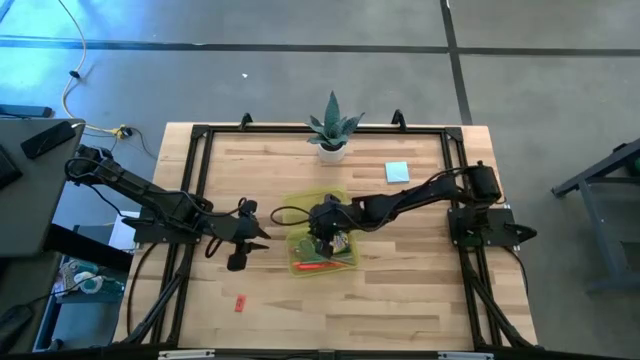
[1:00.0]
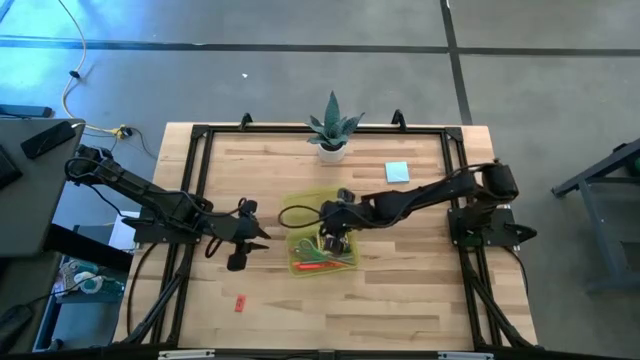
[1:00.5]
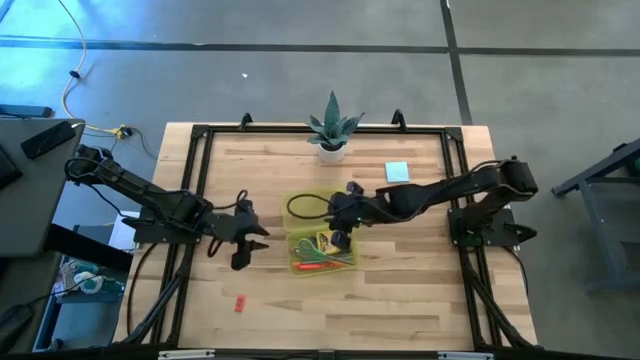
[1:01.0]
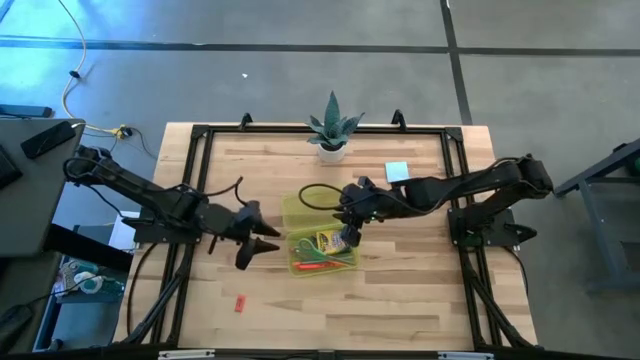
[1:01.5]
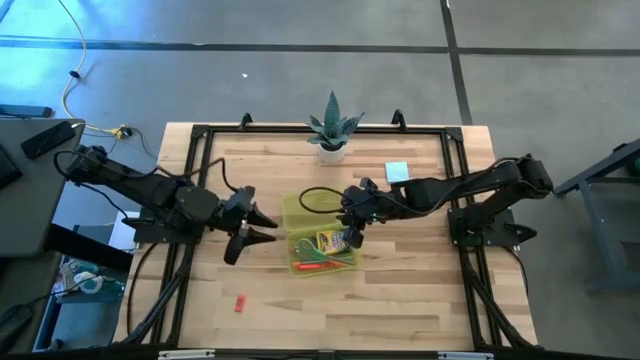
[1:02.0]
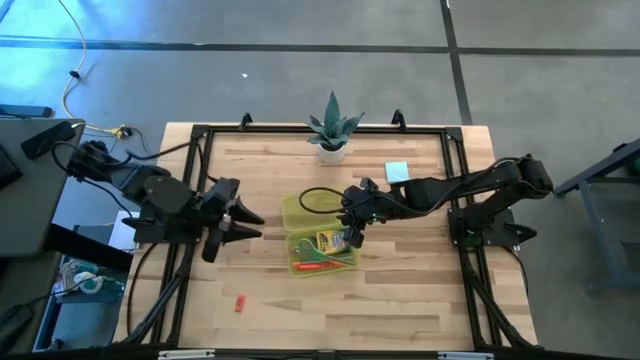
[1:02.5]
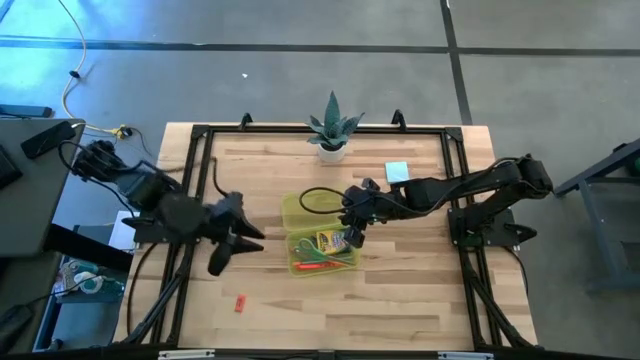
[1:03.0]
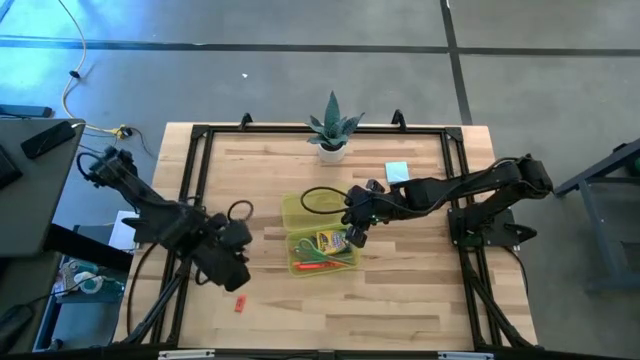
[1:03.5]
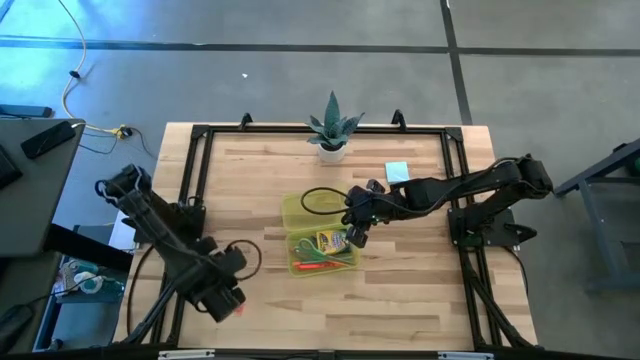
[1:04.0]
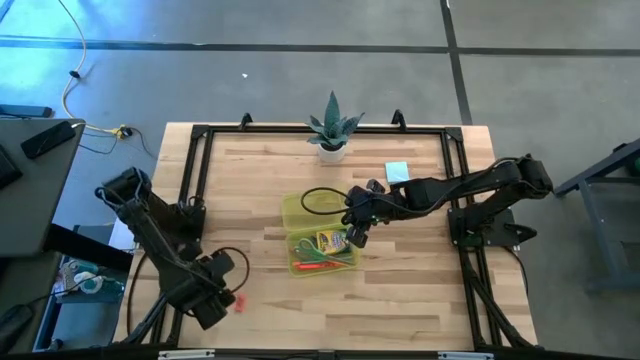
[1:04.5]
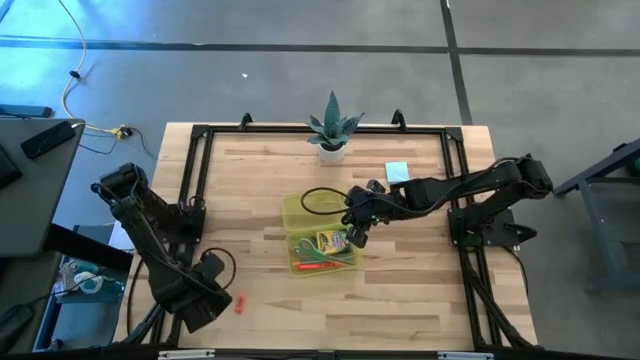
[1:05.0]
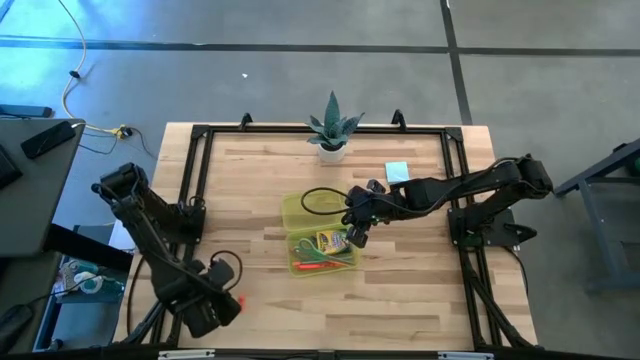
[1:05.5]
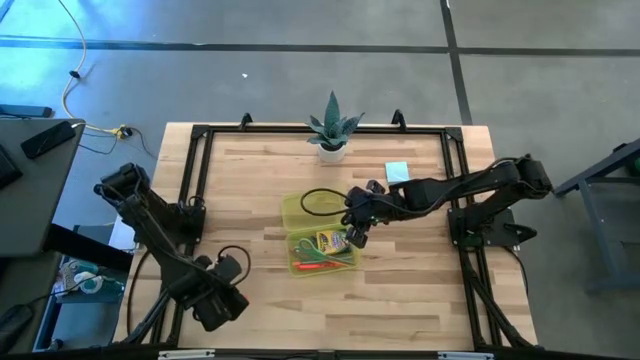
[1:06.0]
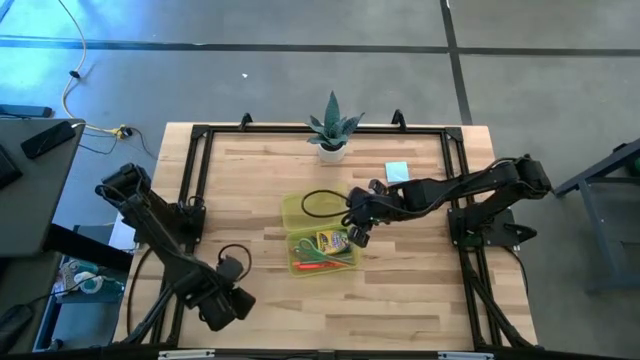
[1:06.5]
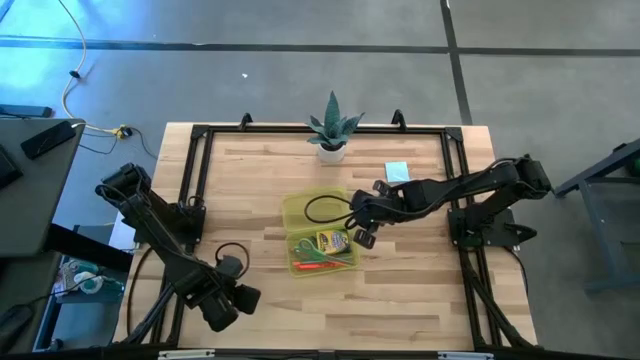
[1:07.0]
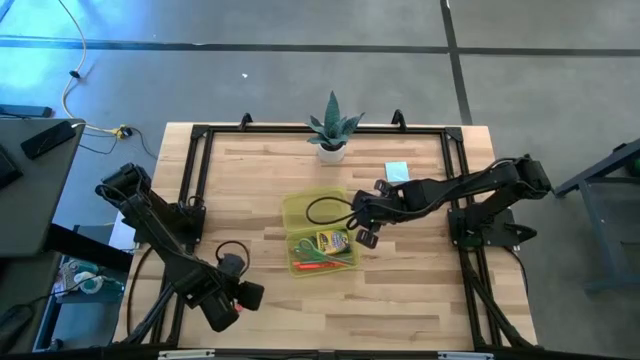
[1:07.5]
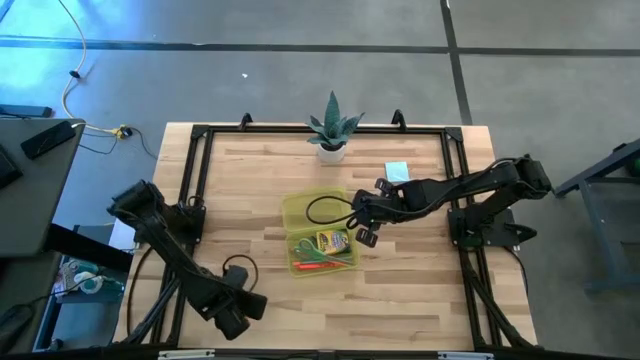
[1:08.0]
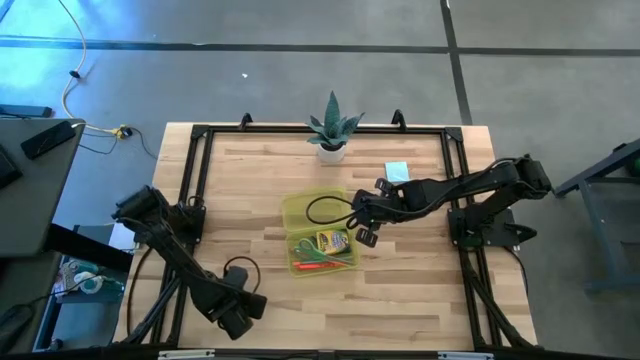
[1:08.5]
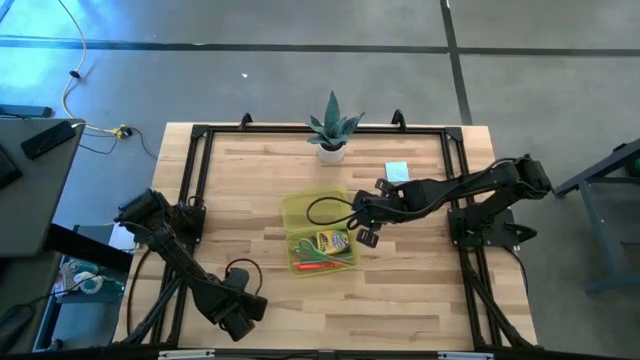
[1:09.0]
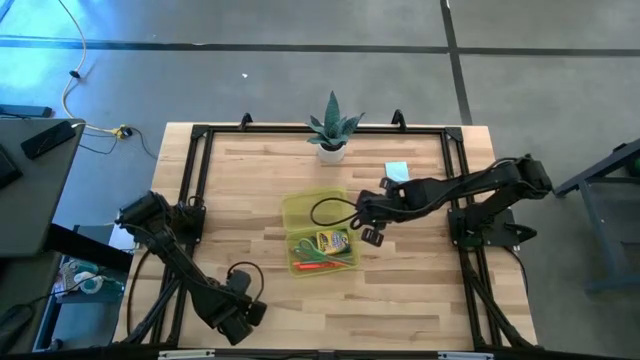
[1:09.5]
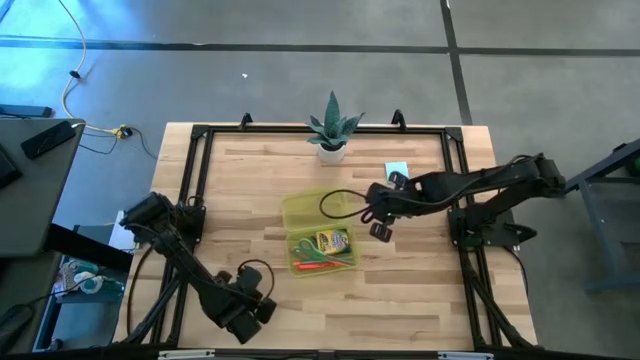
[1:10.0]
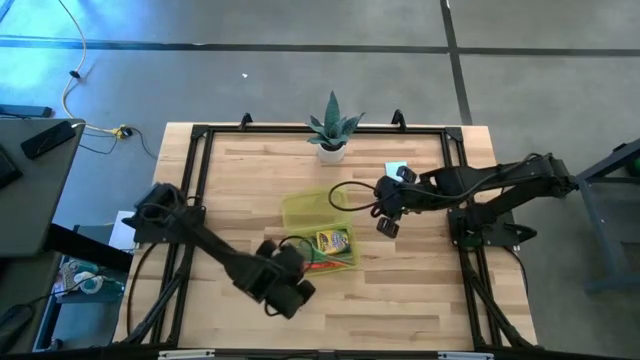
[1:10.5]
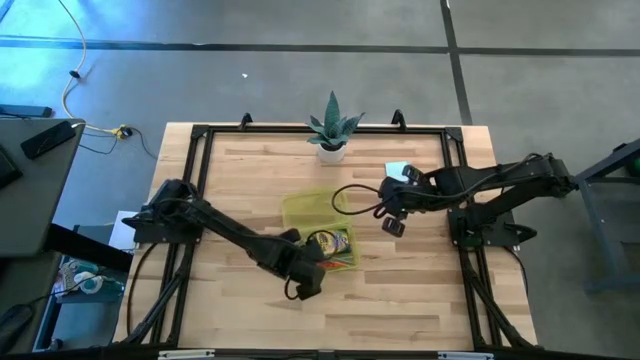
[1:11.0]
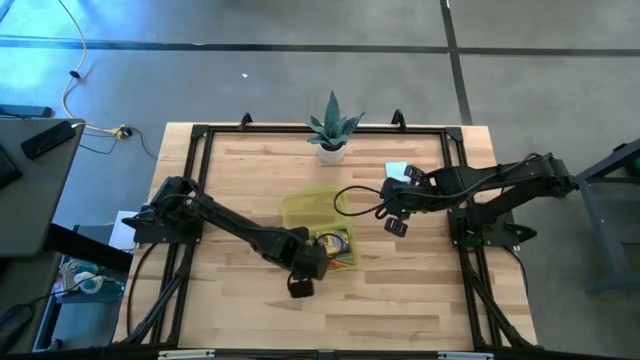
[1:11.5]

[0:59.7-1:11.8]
Task: Pack school essentials
Put the orange eraser into the yellow school supply box

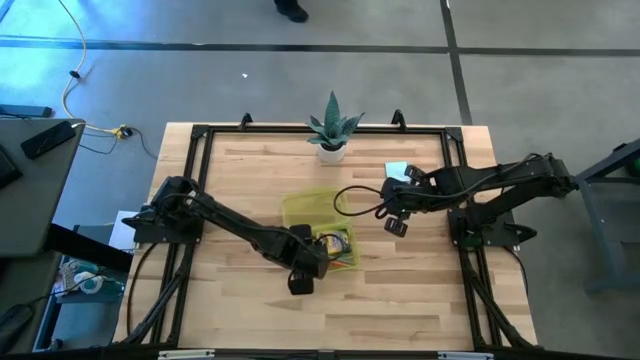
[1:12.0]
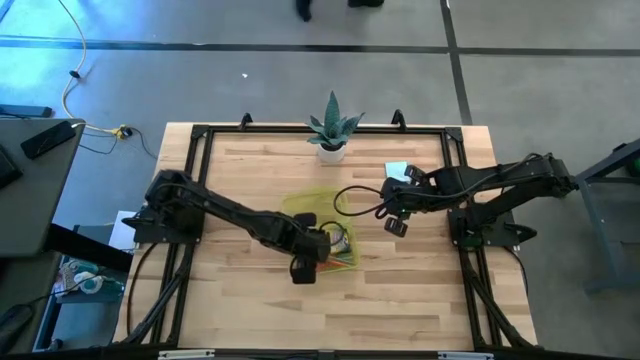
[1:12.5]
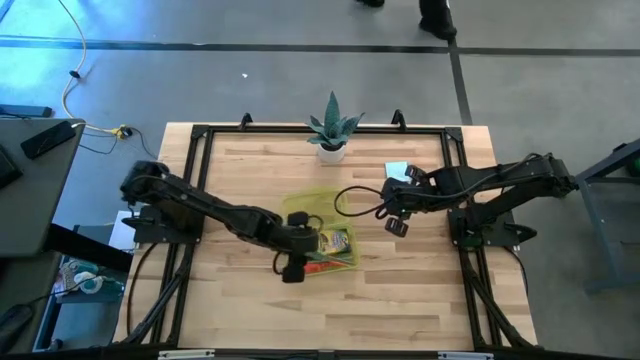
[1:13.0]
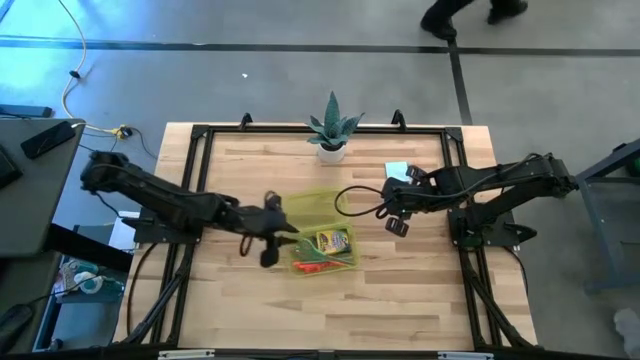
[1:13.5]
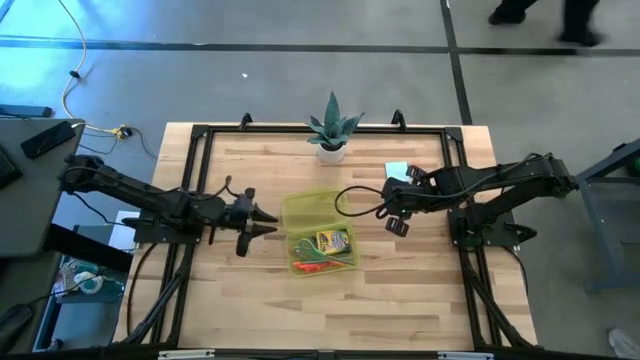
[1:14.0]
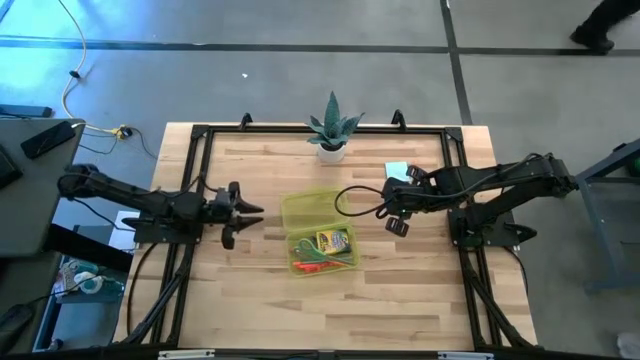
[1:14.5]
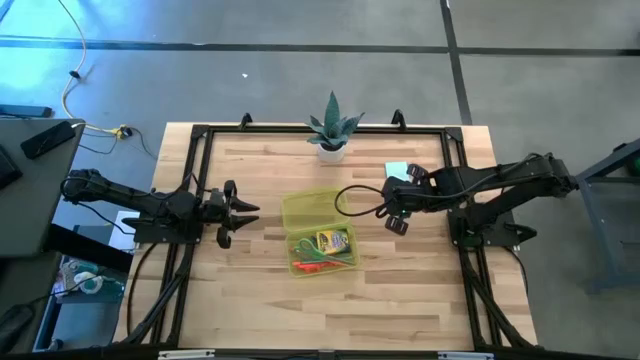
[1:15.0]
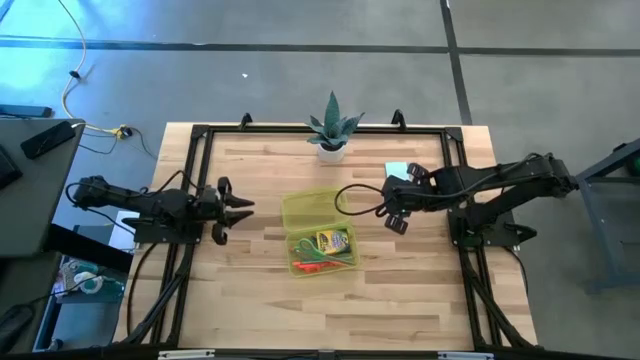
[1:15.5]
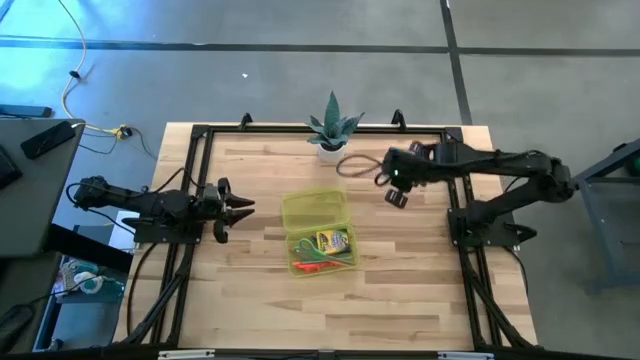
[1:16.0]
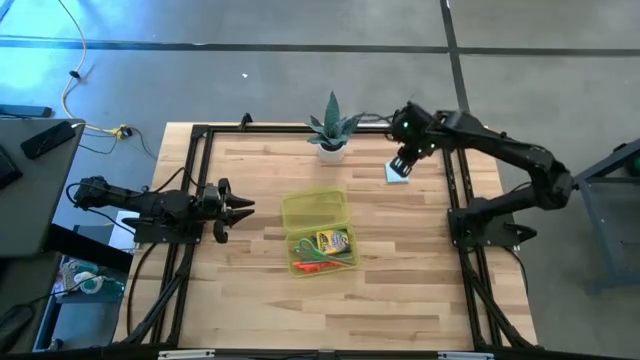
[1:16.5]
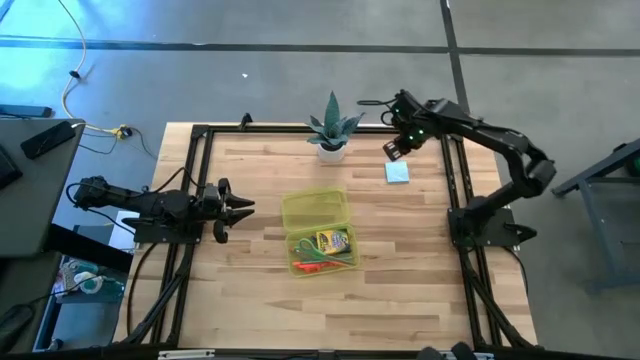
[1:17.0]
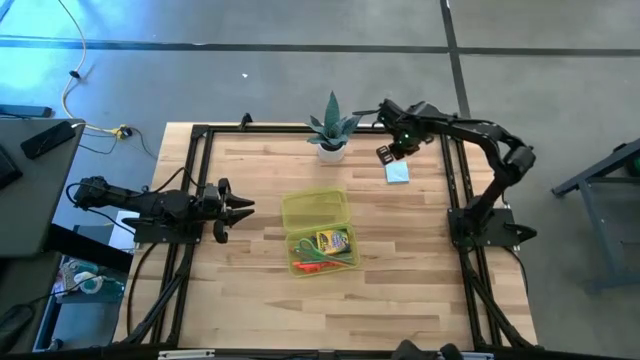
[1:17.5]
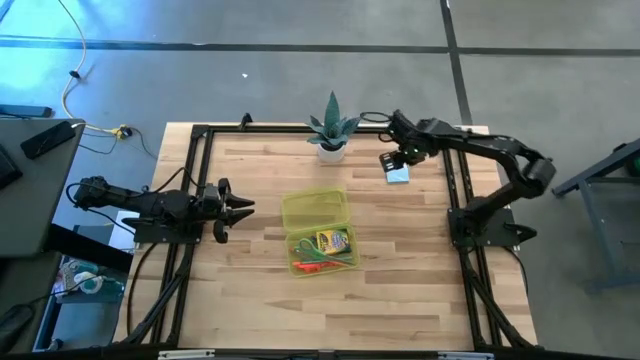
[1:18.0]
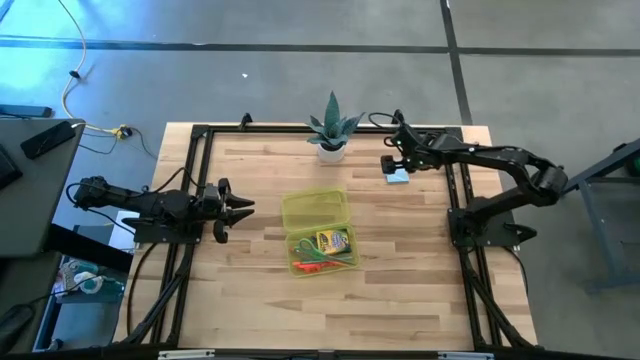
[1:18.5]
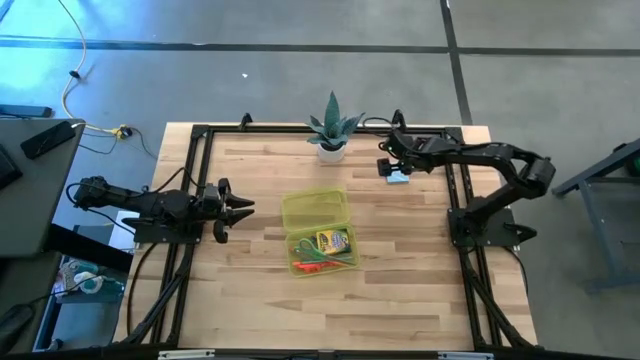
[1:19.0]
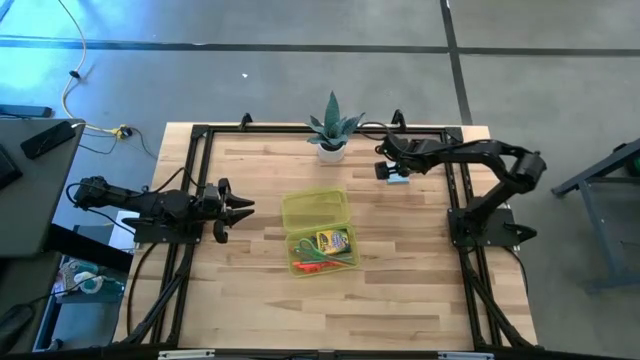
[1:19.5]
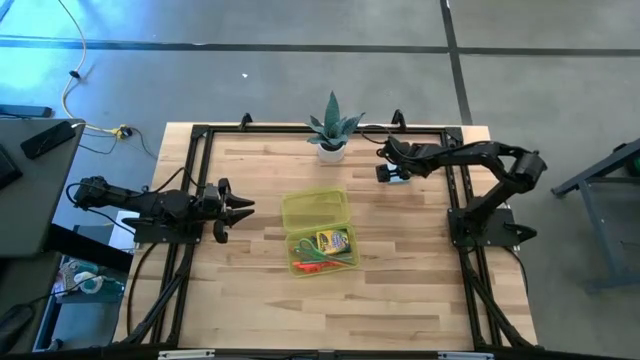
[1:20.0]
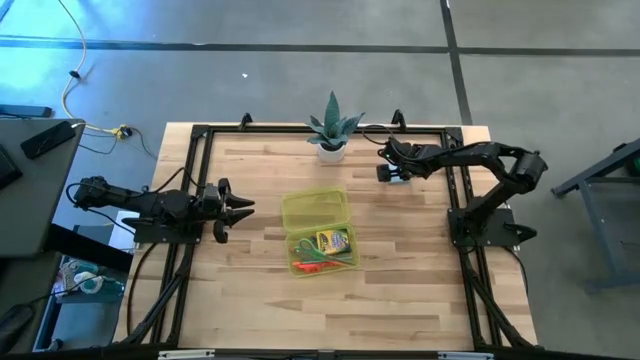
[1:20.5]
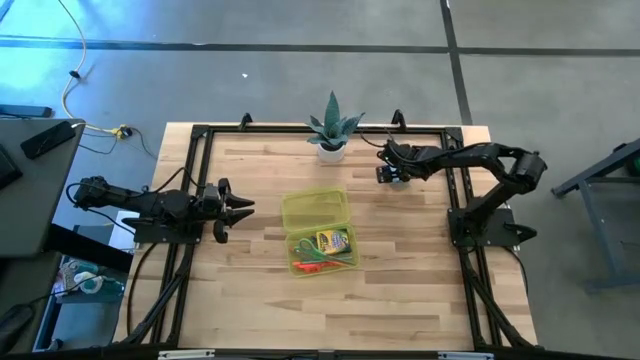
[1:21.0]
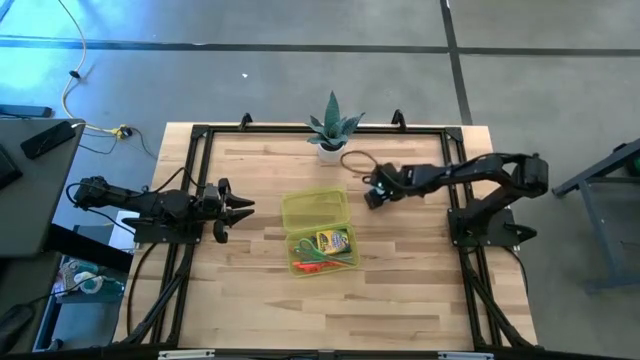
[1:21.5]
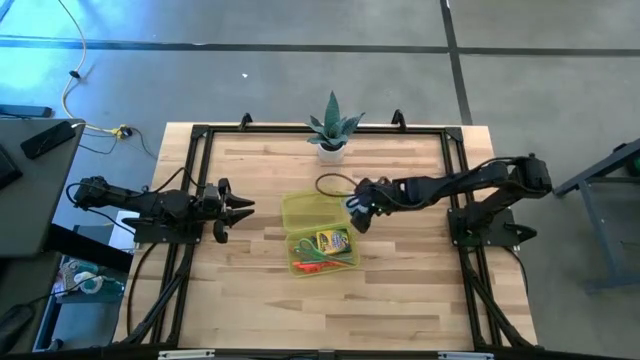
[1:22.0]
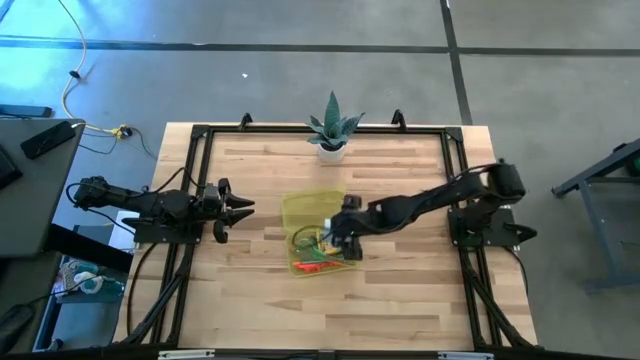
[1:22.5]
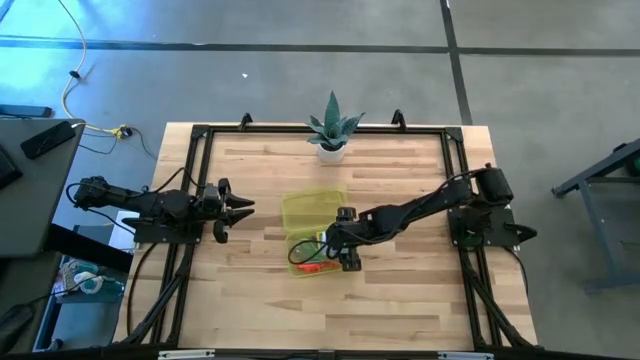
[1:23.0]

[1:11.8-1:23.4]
Put the blue sticky notes into the yellow school supply box
